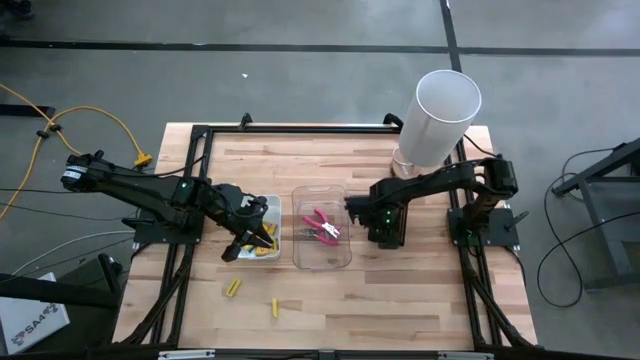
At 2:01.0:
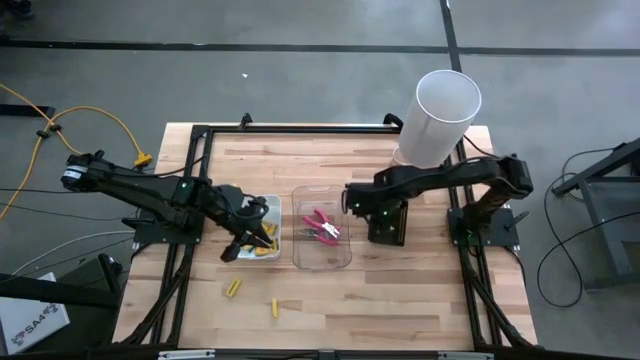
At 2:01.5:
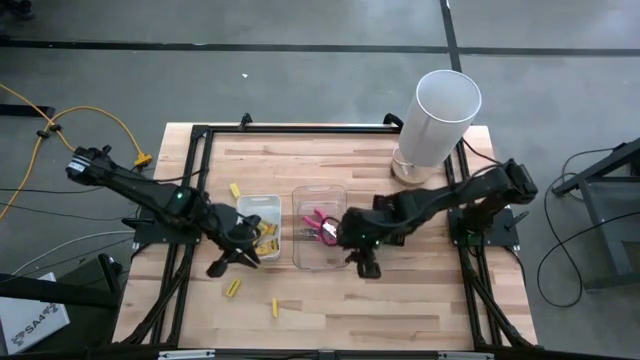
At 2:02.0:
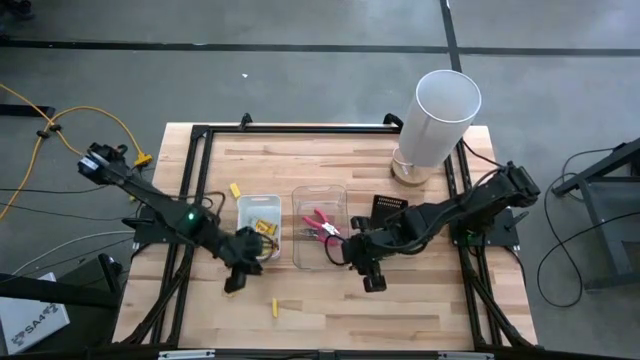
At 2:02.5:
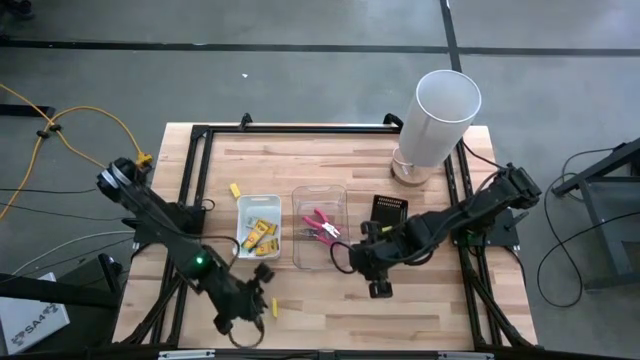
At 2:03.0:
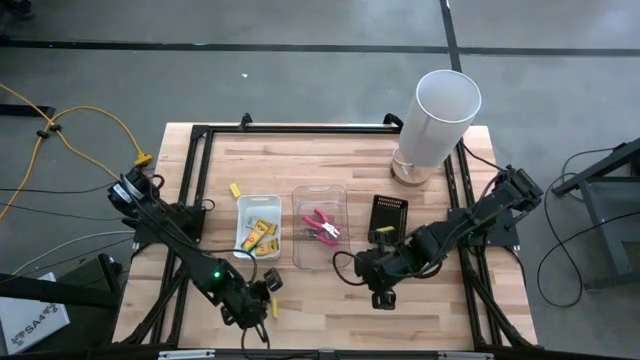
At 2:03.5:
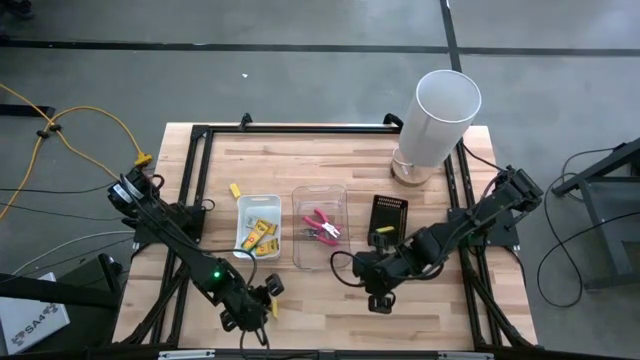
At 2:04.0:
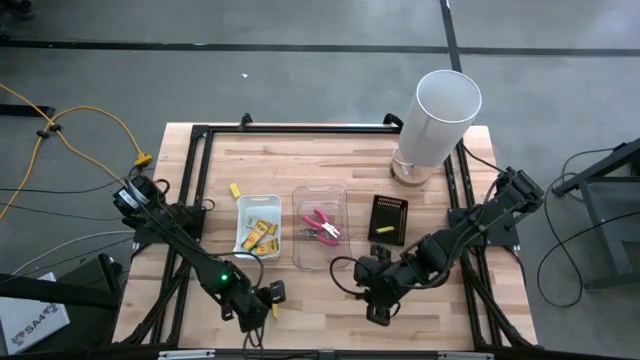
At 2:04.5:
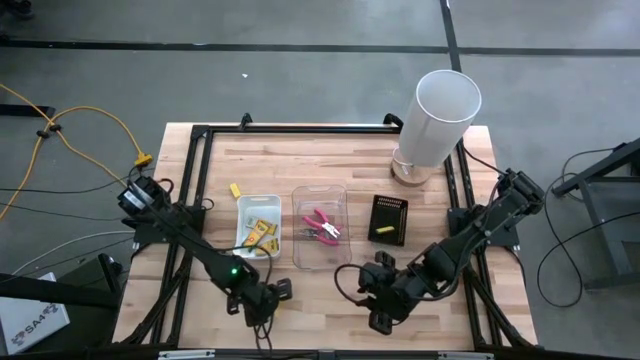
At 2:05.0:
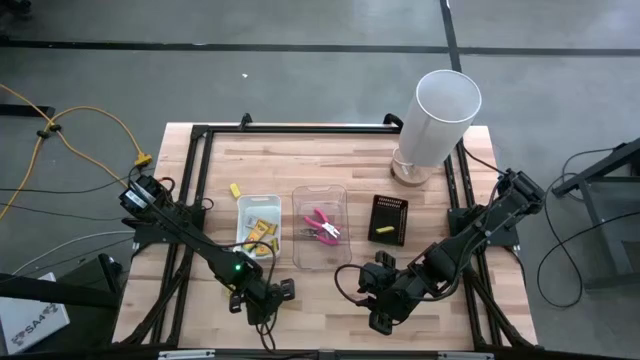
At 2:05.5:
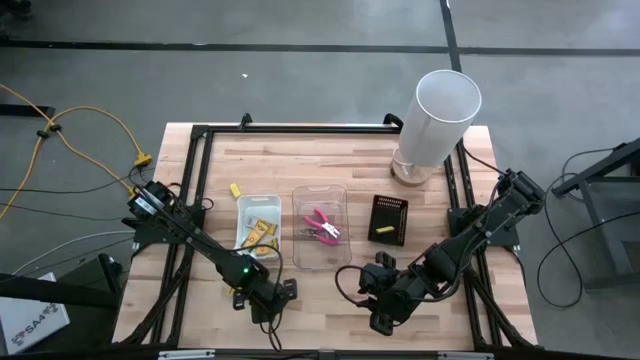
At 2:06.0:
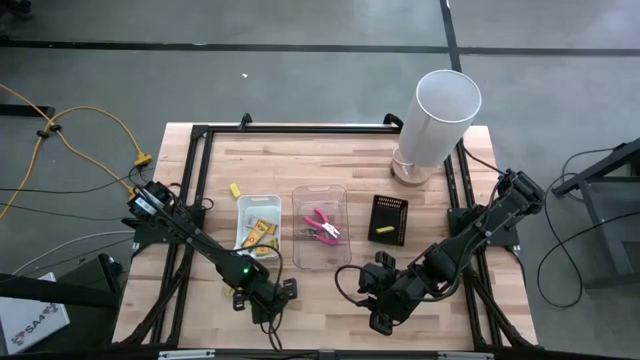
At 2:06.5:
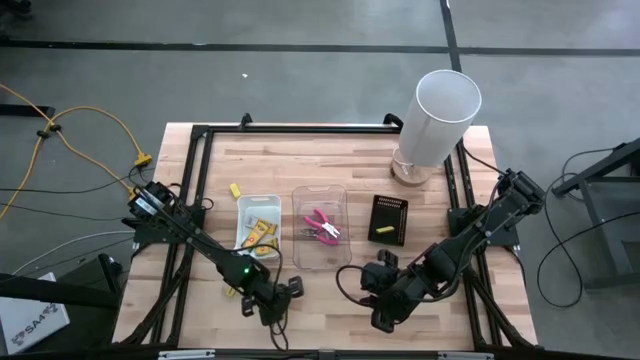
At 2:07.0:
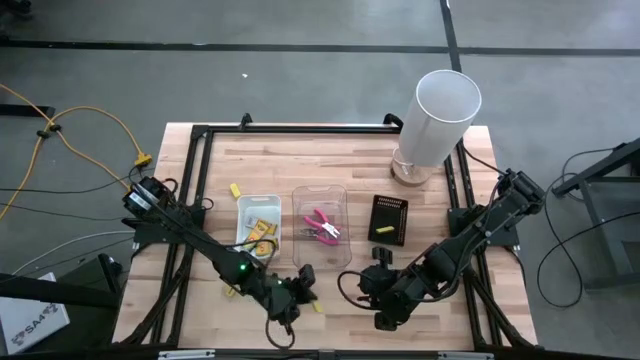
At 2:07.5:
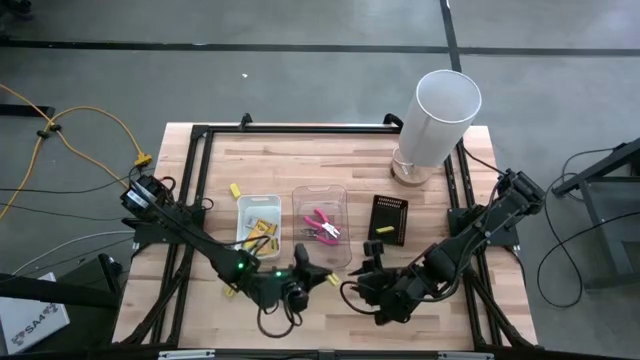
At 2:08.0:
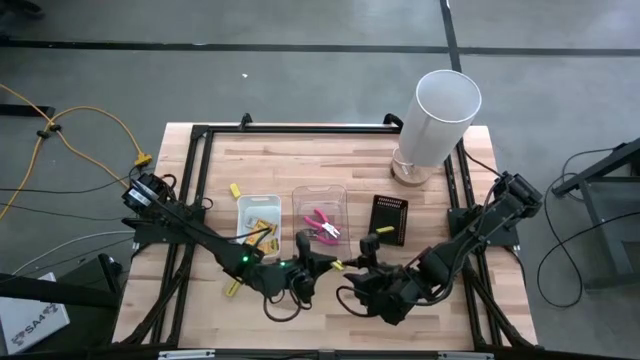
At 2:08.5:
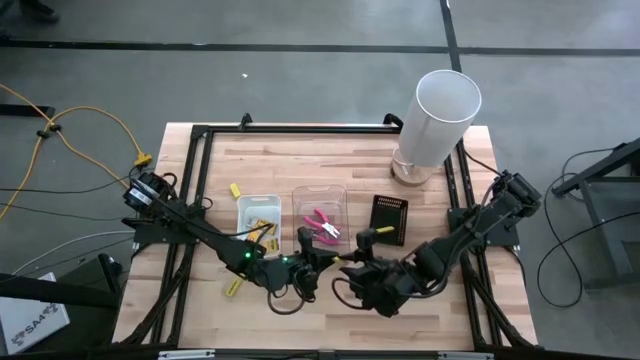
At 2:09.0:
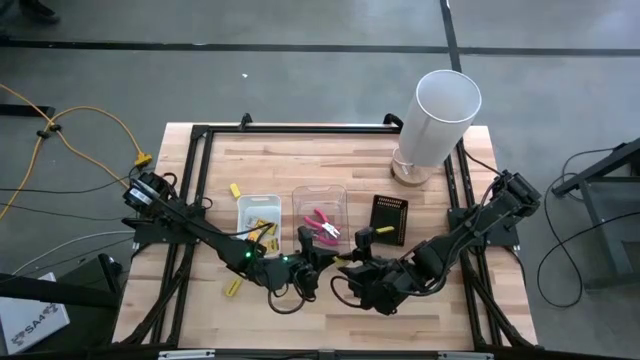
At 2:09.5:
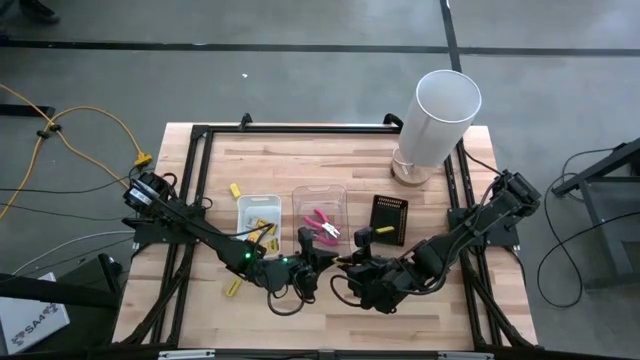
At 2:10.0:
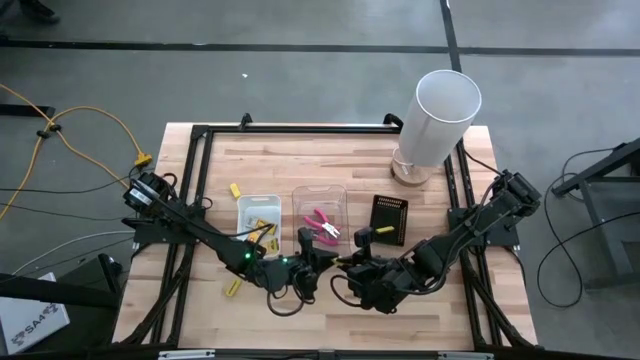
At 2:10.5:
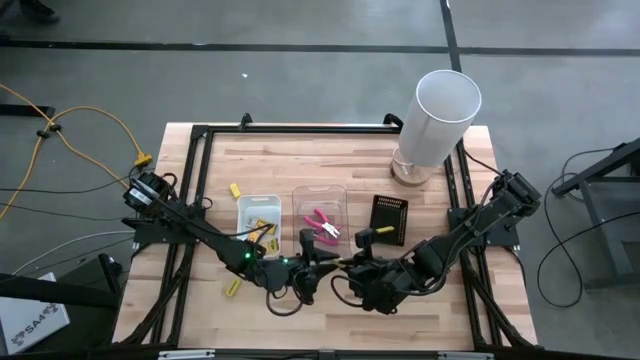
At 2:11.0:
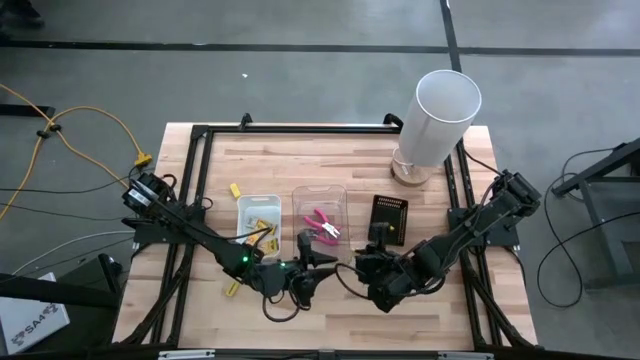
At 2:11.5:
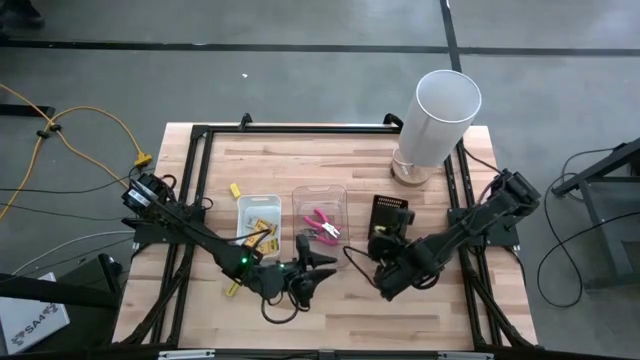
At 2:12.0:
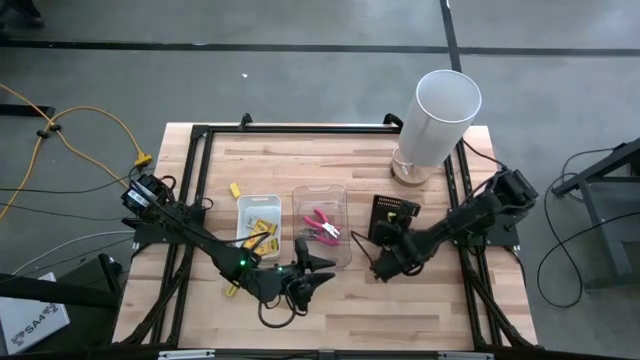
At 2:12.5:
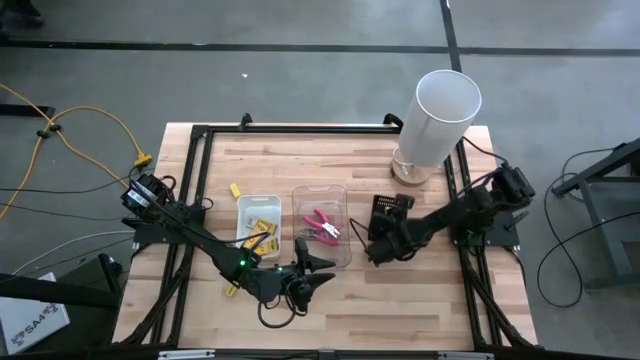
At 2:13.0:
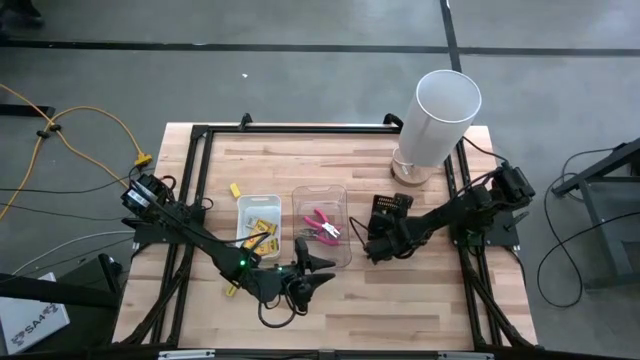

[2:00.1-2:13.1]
Task: Pick & Place School Supplies
Put the yellow eraser into the black basket

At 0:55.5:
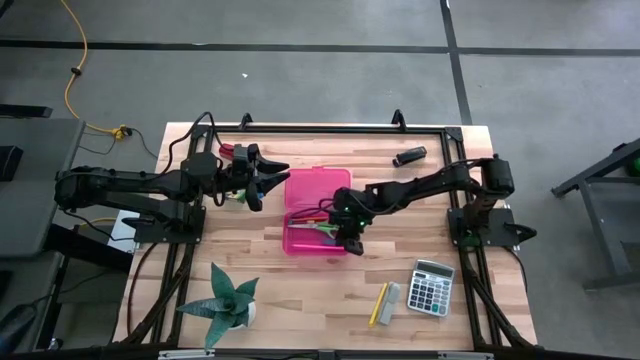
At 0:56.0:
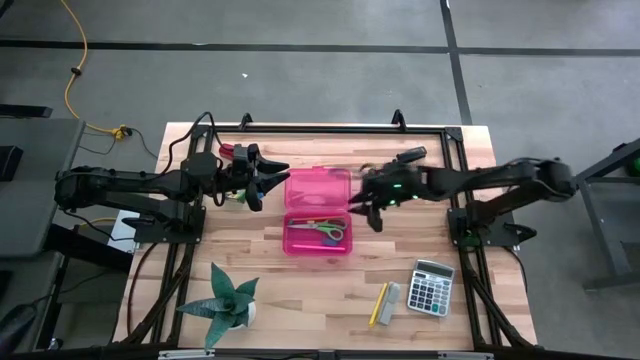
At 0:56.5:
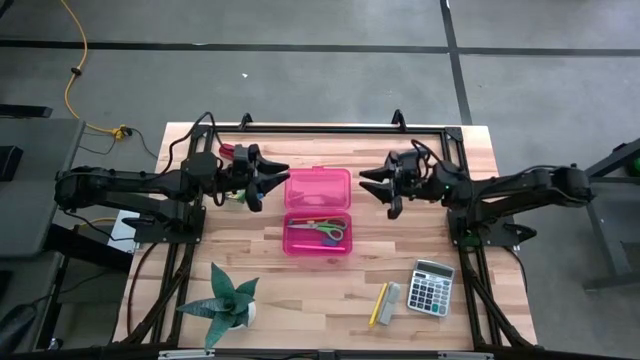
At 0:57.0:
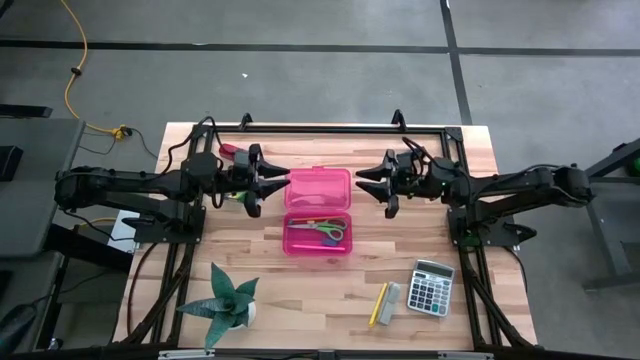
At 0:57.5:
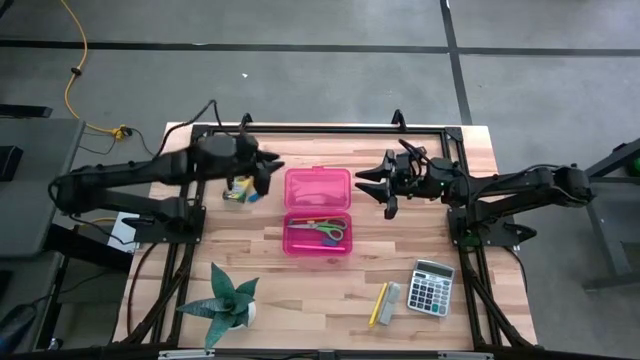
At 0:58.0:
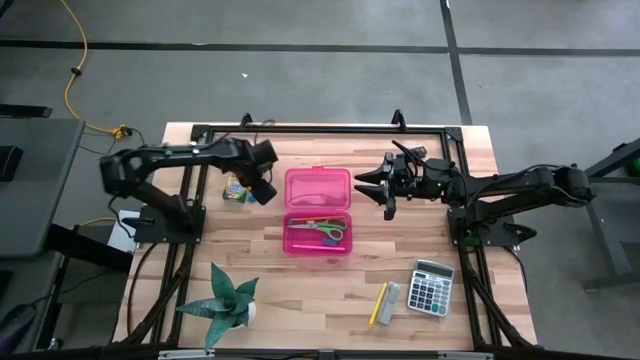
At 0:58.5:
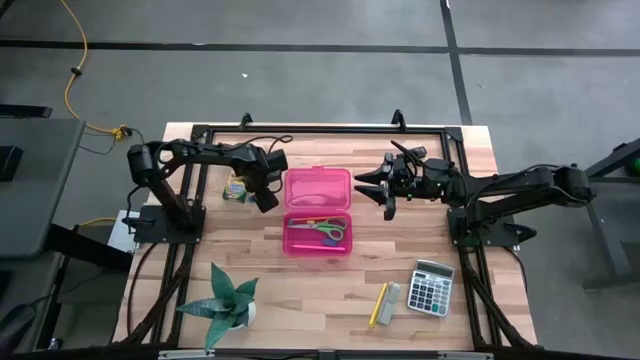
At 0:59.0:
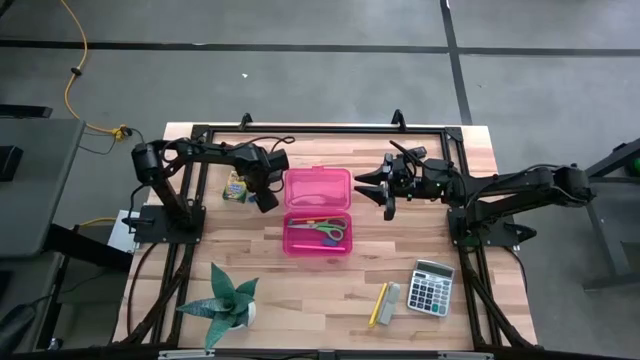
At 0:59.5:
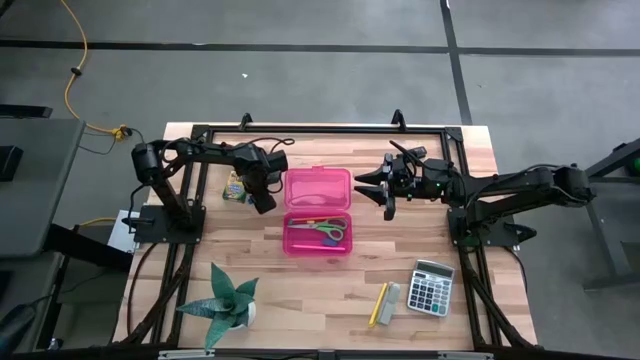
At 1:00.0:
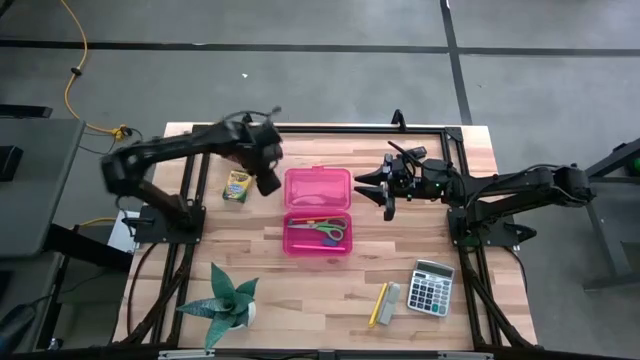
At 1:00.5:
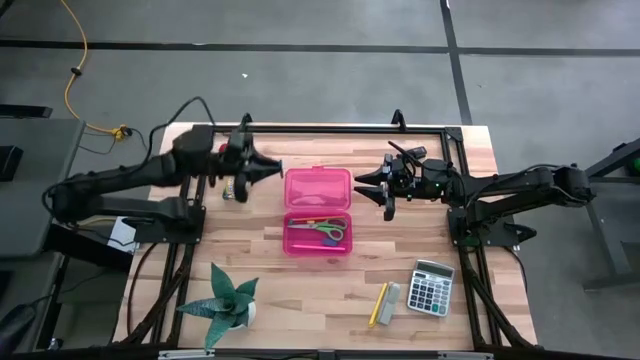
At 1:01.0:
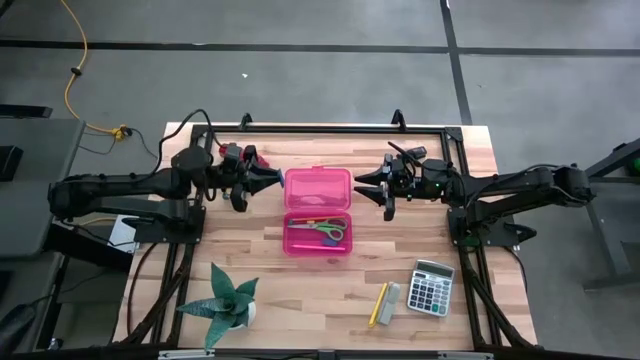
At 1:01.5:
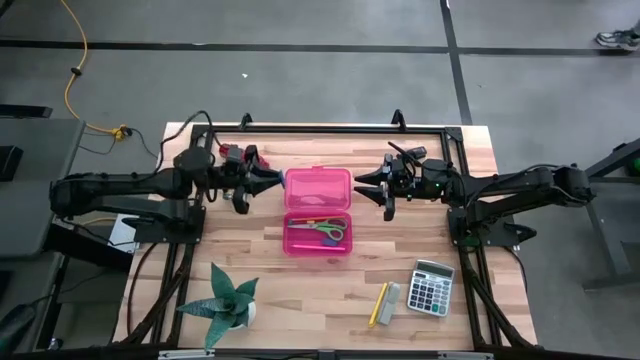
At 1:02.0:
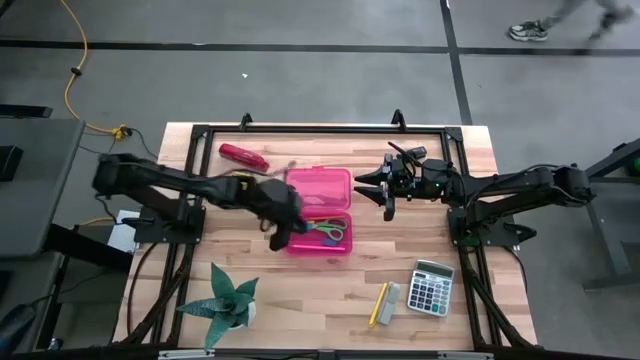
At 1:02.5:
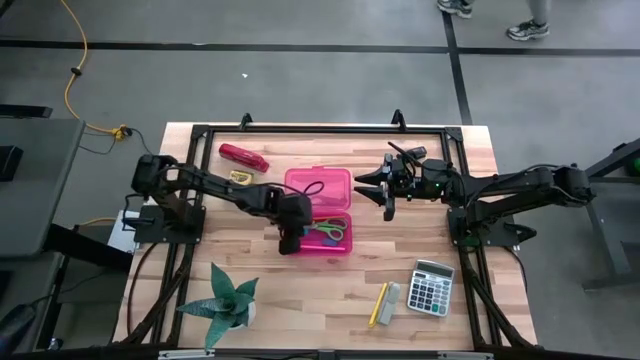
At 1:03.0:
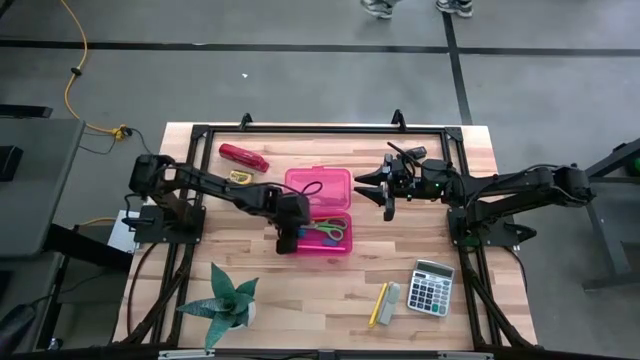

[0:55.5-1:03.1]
Task: Pack school essentials
Put the blue eraser into the pink supply box

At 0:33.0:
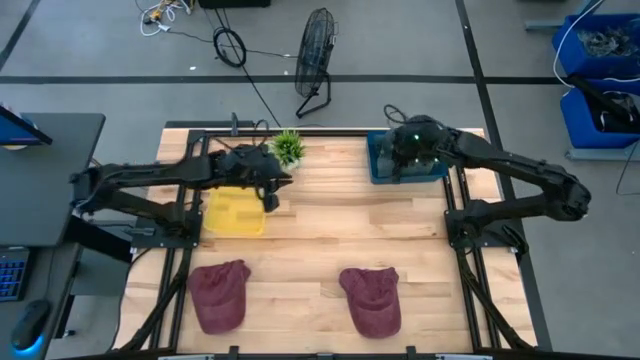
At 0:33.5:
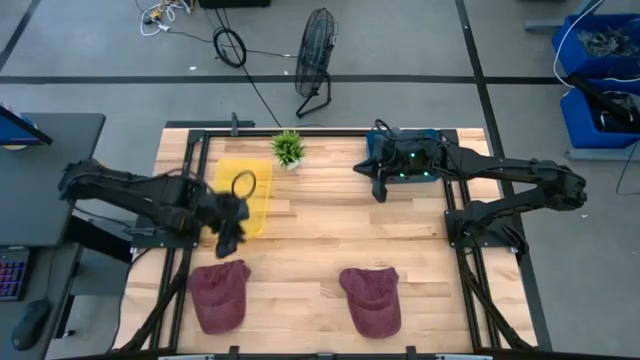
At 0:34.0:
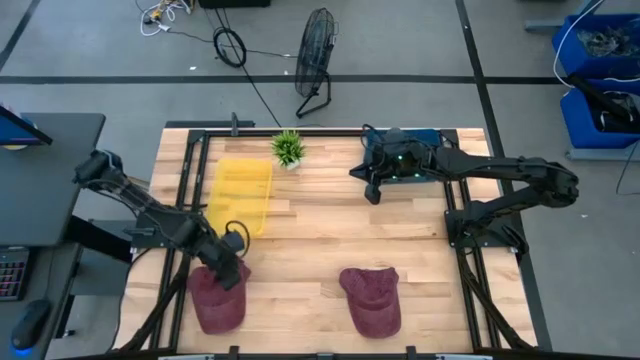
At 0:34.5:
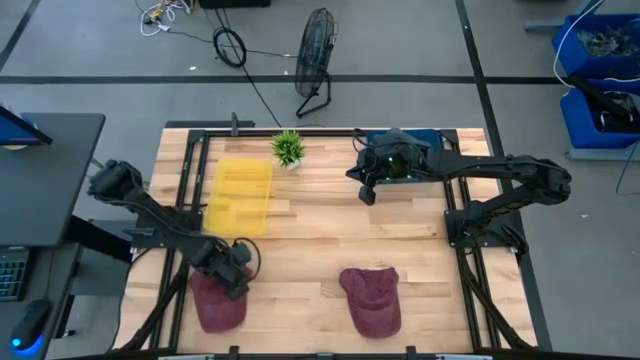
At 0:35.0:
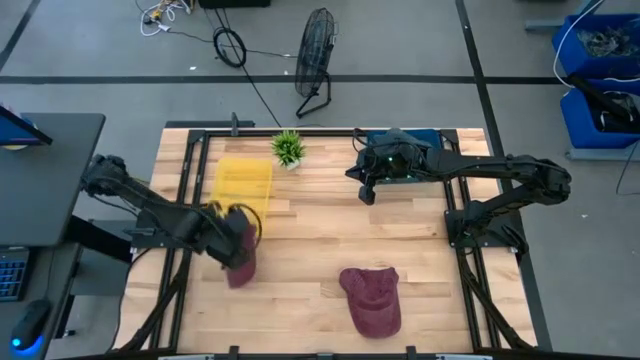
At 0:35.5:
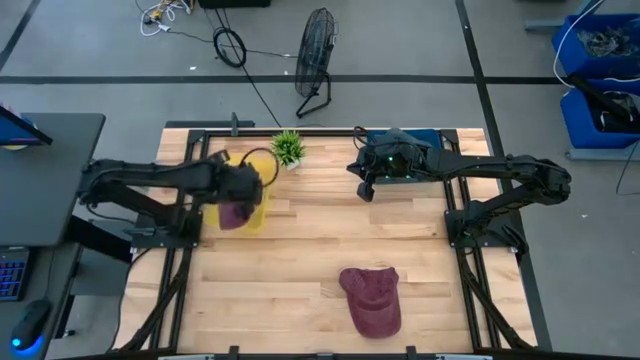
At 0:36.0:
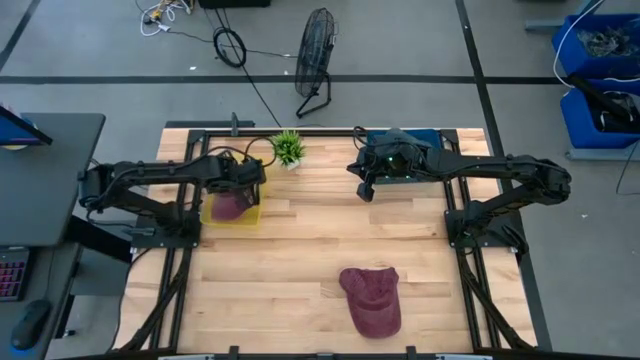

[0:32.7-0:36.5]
Task: Pick & Place hat
Put the left red cap into the yellow bin
